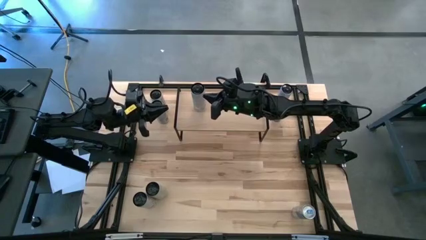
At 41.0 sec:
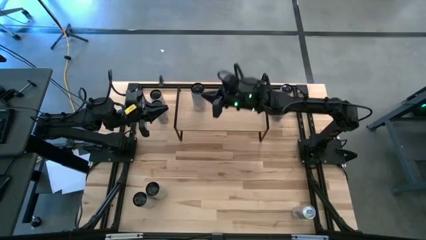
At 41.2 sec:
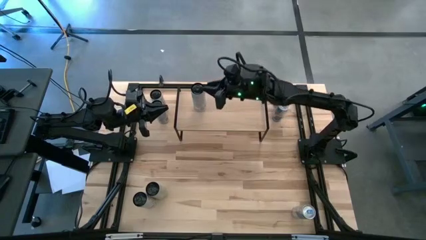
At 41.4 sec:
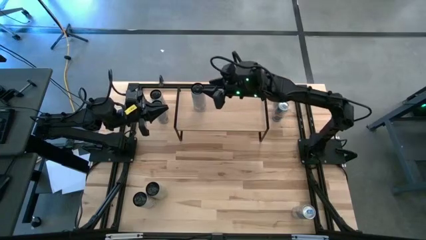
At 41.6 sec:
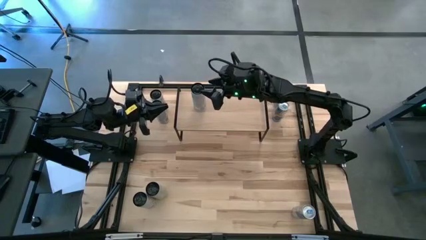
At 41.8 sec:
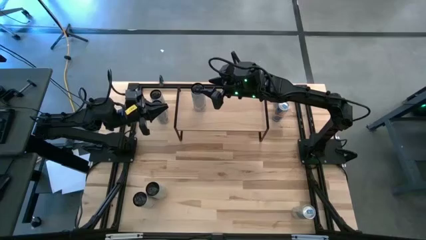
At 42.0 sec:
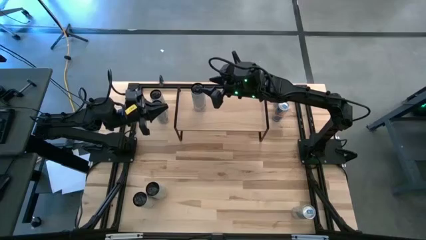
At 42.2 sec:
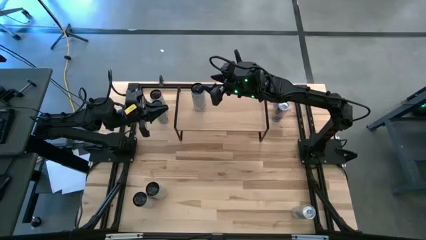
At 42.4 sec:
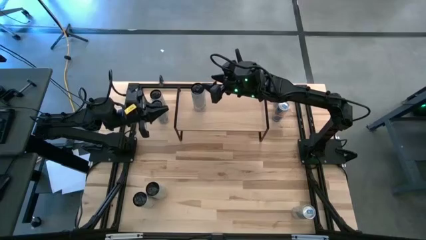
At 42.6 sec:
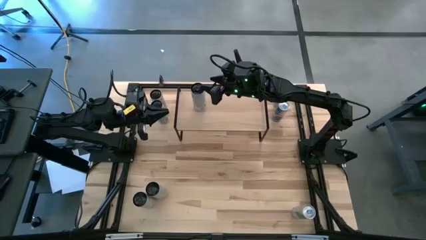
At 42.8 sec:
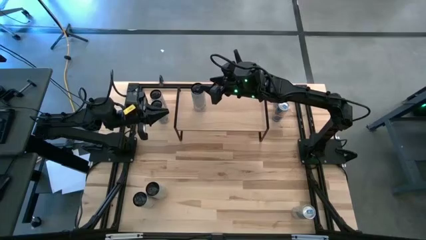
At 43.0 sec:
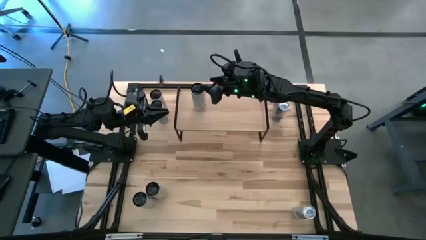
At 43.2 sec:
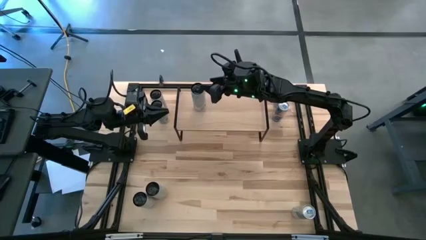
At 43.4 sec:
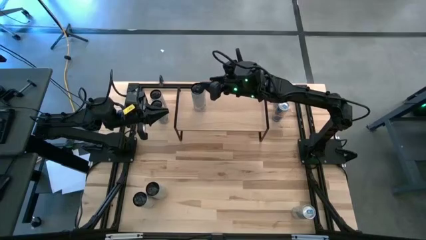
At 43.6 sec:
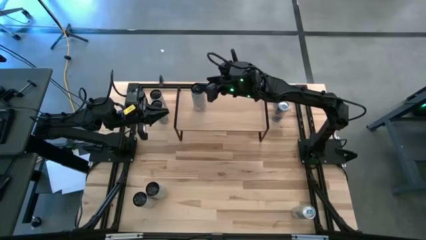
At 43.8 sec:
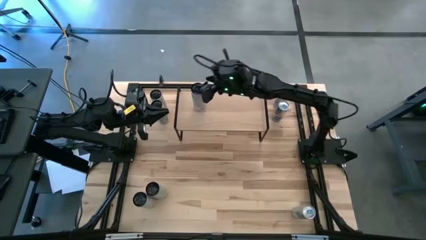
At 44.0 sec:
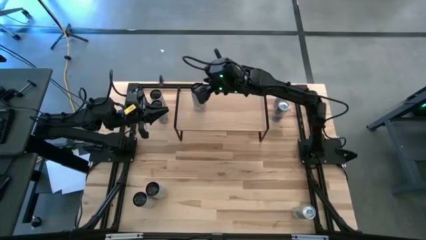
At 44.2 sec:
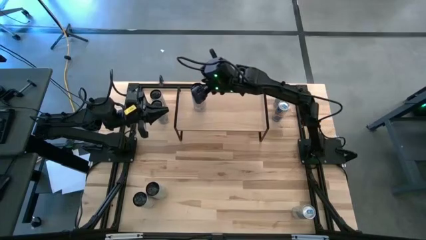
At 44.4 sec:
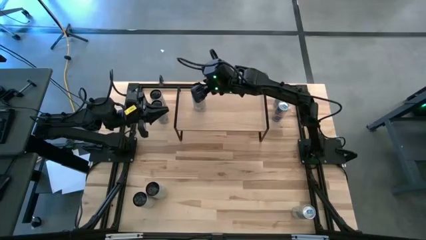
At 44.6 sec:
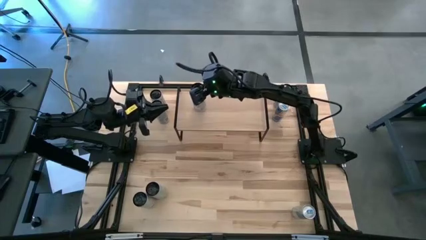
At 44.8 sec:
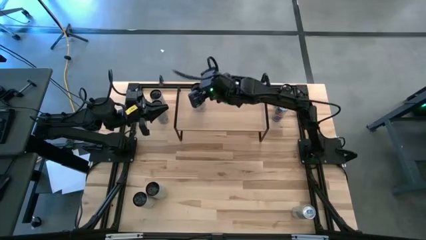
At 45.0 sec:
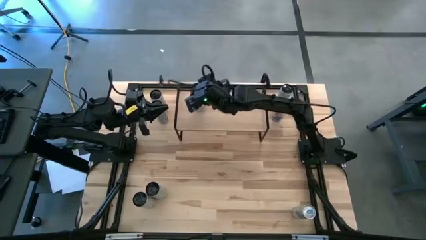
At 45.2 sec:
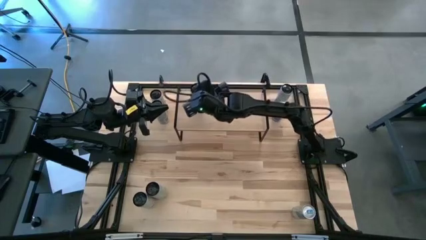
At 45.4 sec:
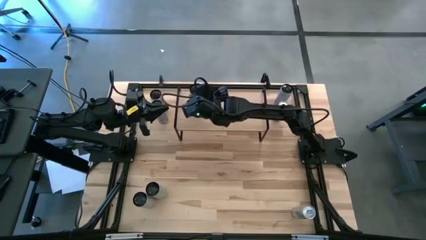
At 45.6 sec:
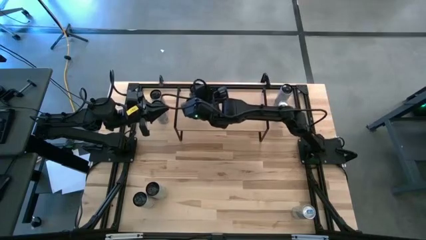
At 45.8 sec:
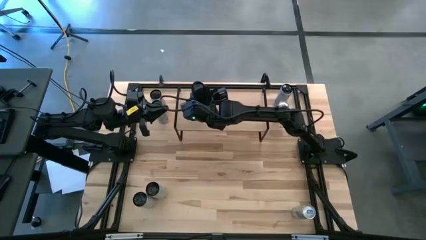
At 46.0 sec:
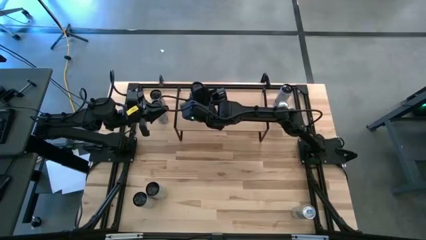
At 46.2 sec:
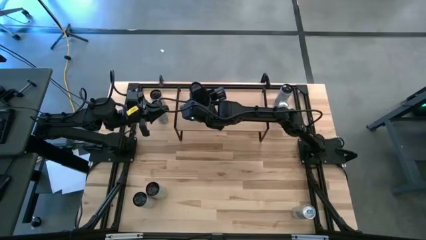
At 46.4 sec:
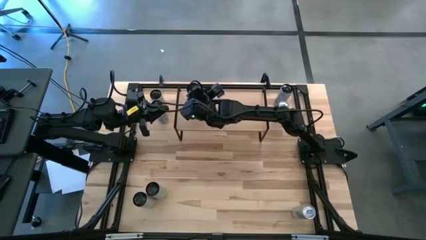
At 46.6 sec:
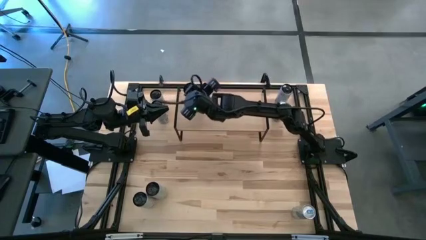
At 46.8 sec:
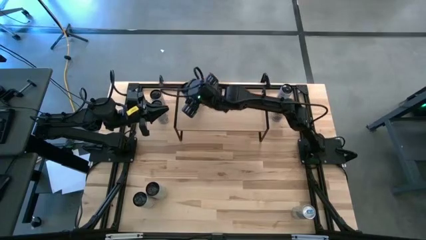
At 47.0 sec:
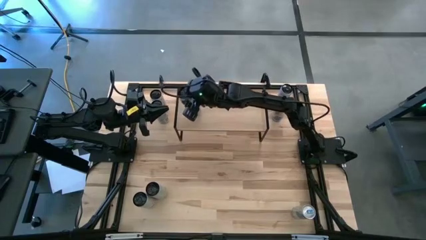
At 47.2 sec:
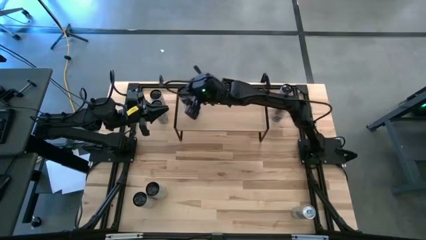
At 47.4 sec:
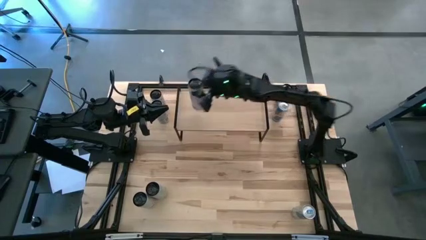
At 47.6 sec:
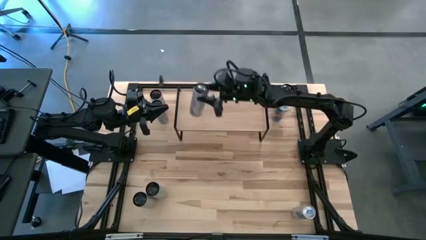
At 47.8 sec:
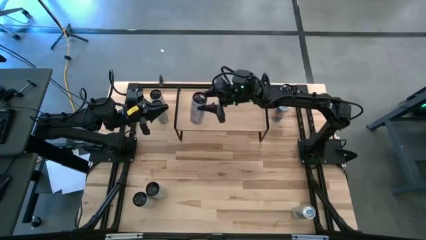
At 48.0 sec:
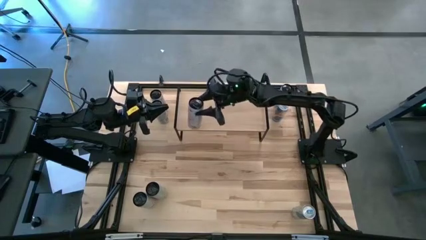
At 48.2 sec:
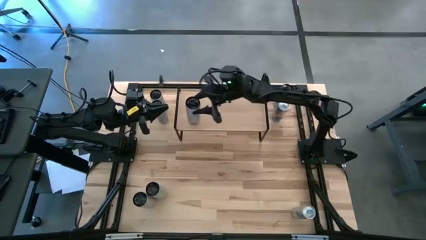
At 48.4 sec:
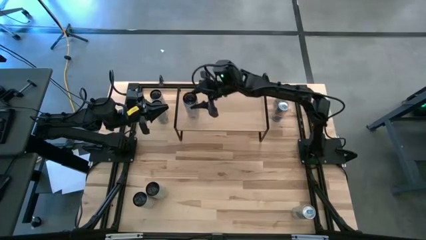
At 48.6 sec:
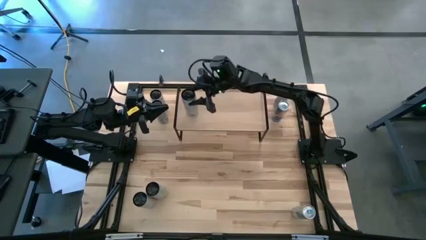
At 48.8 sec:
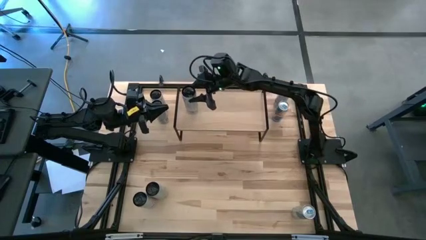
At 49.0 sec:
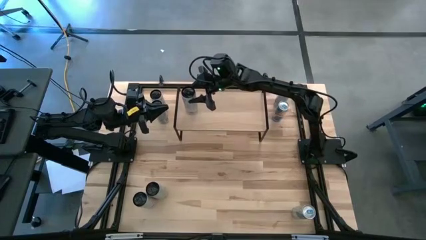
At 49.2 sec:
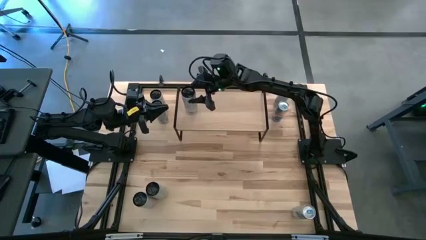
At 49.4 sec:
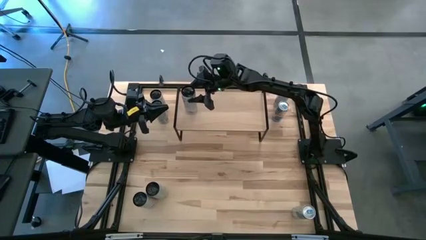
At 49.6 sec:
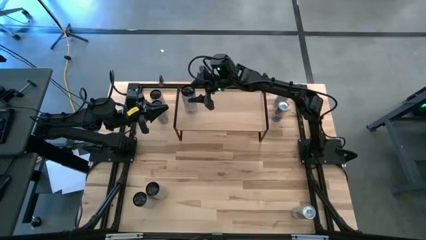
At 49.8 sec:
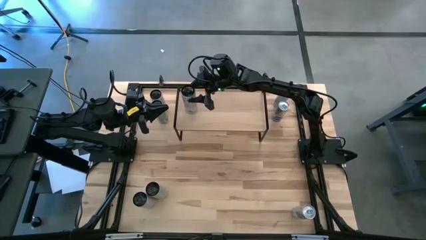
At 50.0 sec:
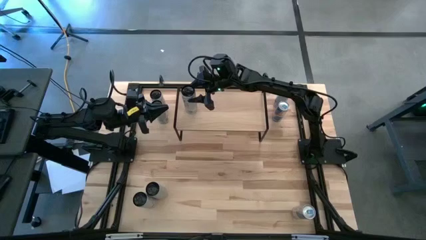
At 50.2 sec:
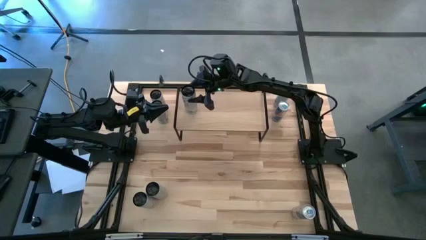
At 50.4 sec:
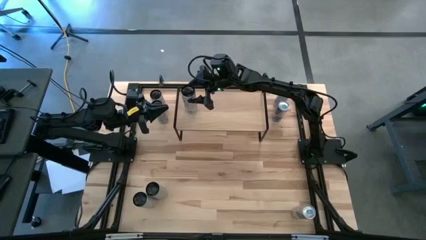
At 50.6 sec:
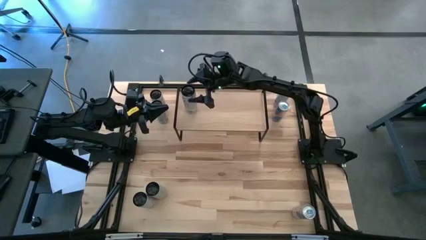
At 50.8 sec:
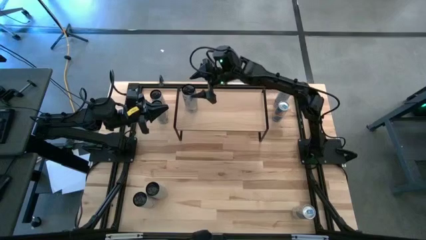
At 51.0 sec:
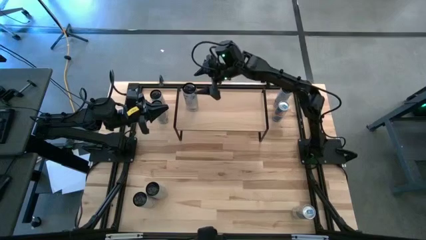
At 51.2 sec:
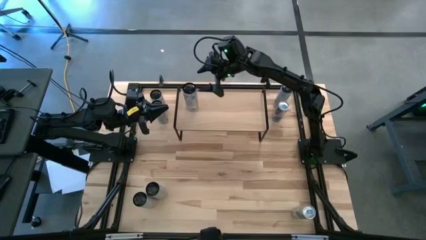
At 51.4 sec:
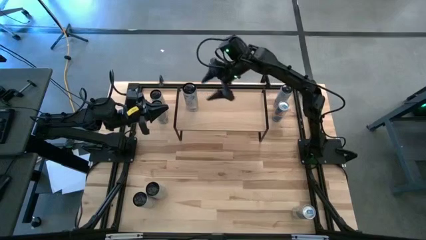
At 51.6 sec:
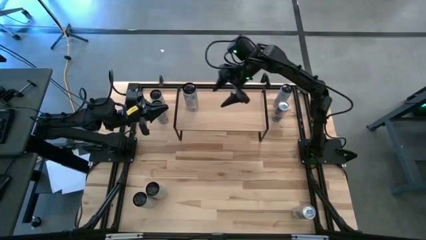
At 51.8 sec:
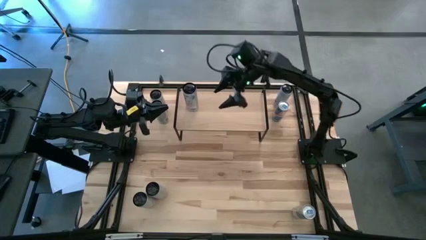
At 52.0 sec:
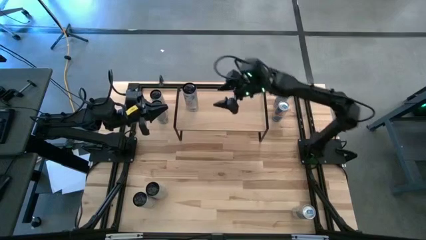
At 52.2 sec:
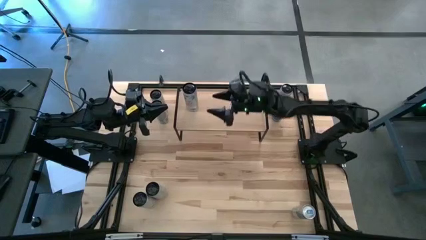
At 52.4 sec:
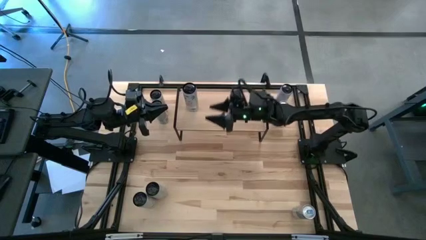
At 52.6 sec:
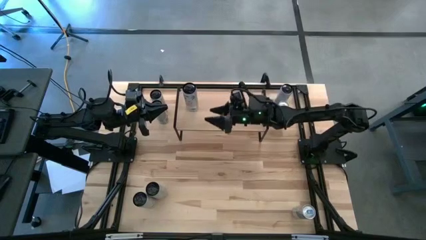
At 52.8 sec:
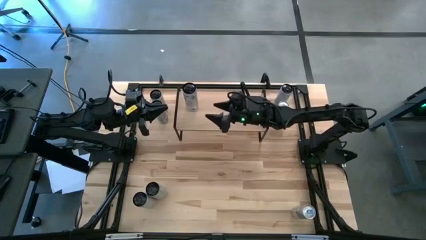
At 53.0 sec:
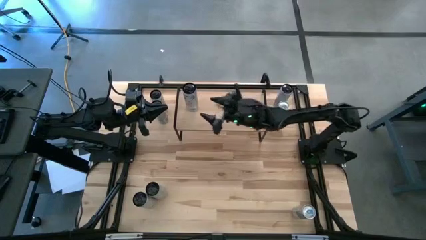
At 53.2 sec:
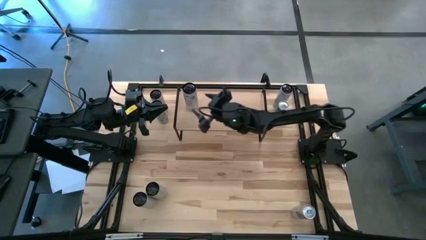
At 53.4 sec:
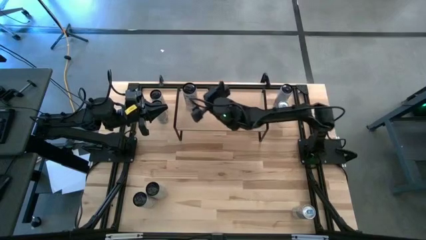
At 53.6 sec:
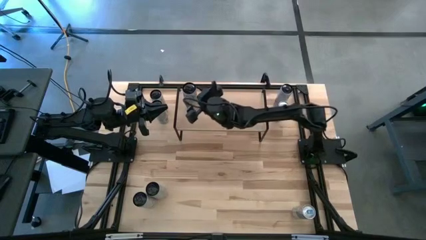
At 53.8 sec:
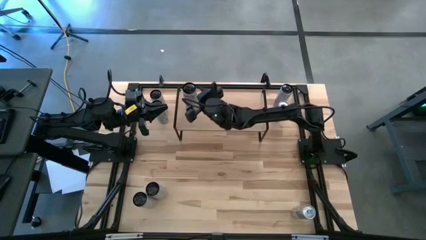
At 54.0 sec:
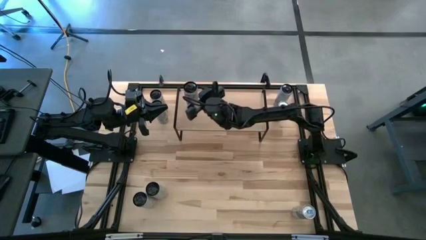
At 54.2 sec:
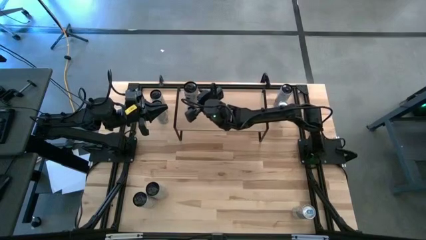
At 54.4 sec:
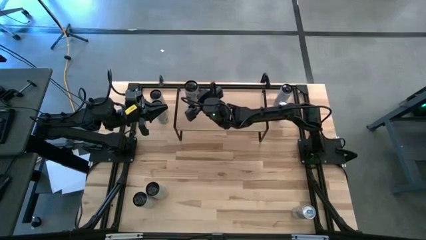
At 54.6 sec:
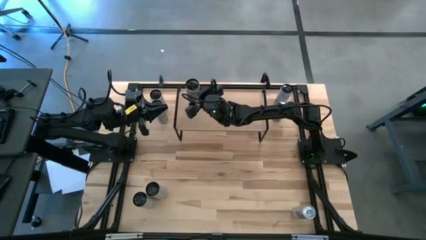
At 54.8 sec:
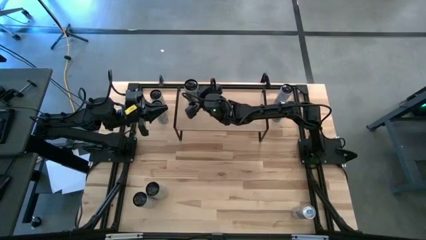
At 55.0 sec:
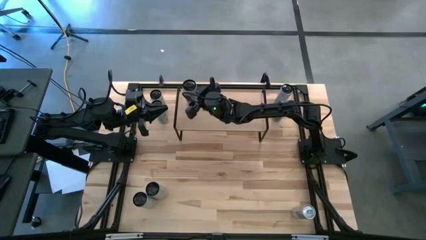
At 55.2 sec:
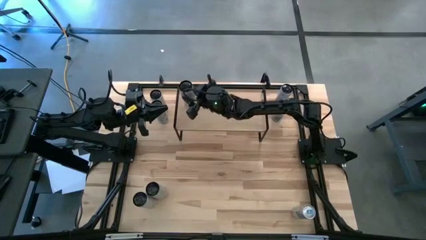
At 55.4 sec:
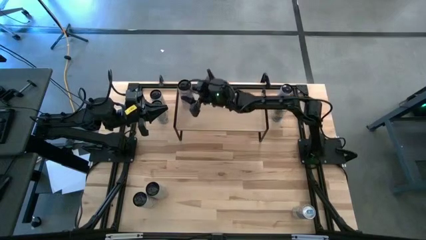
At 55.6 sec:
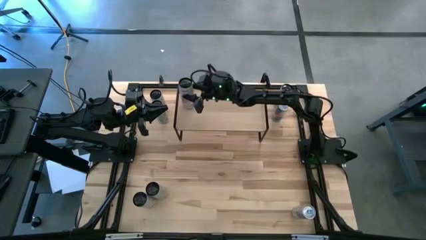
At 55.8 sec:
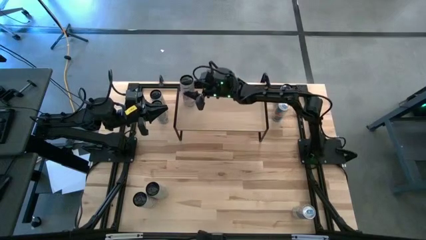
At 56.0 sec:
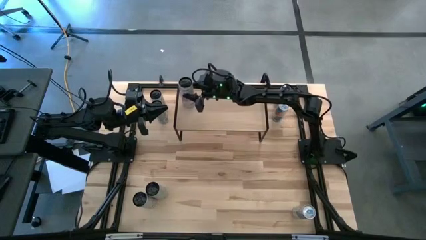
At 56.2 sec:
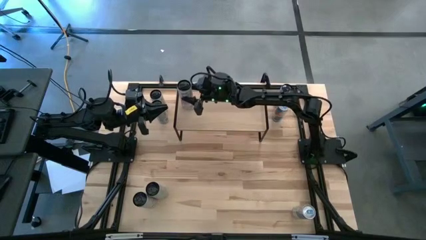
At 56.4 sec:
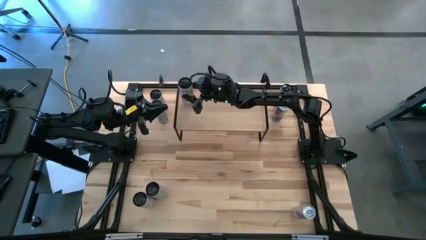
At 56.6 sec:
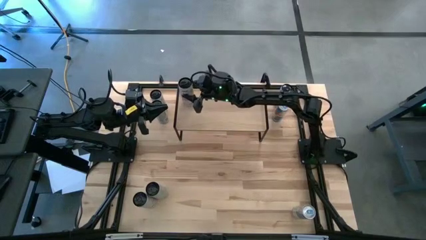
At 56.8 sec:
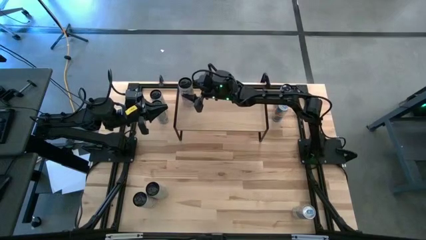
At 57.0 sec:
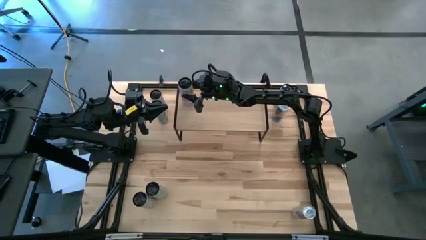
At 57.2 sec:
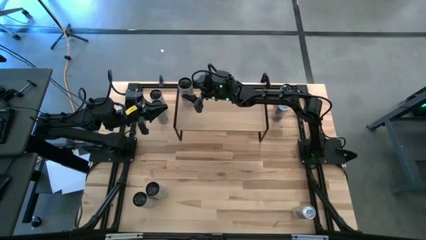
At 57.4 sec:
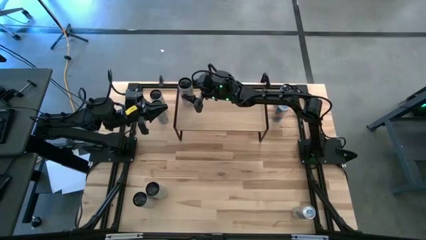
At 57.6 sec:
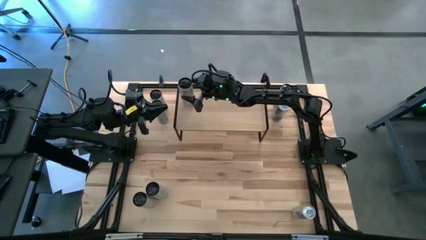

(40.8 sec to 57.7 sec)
Task: Place canned beverage on shelf
Put the right white pink soda can on the shelf
